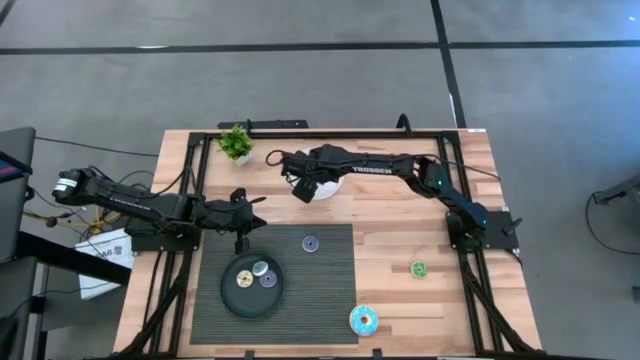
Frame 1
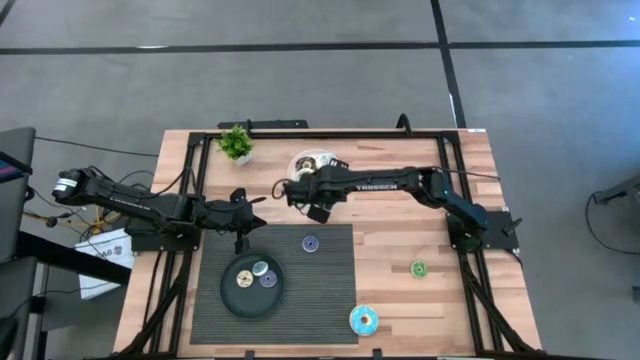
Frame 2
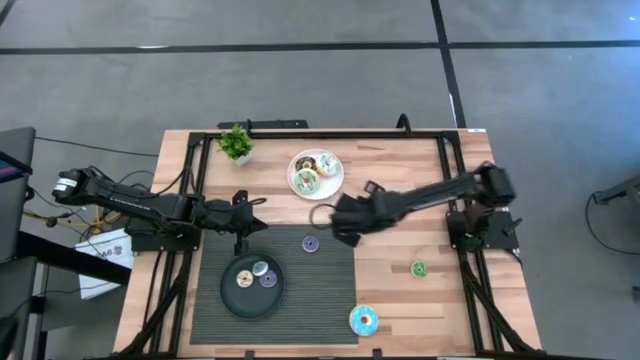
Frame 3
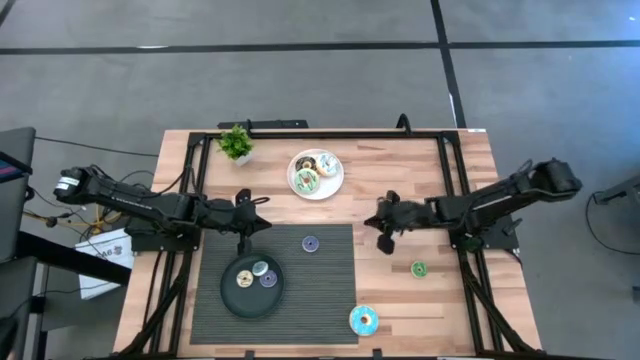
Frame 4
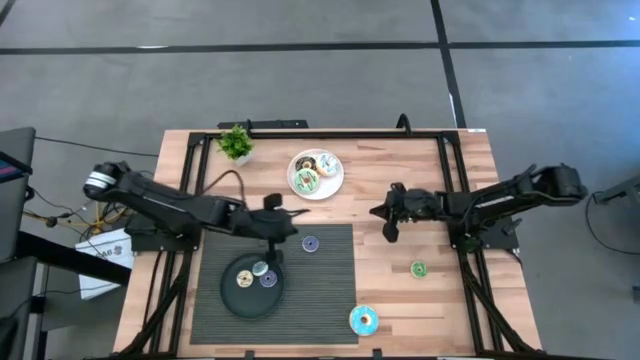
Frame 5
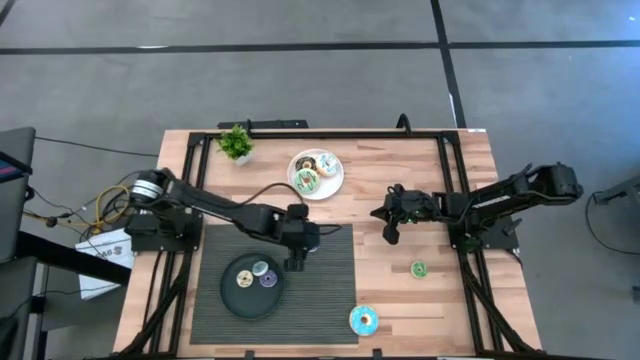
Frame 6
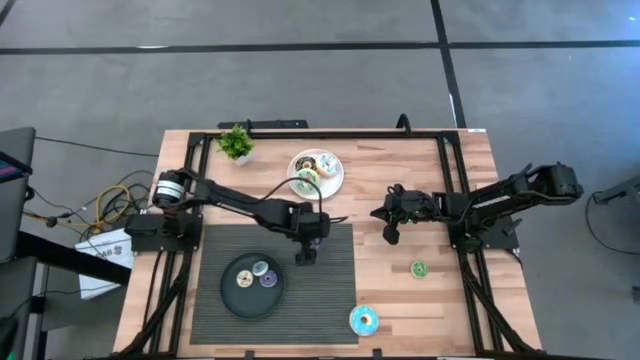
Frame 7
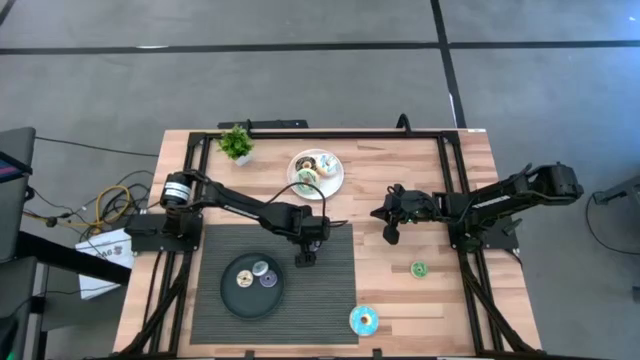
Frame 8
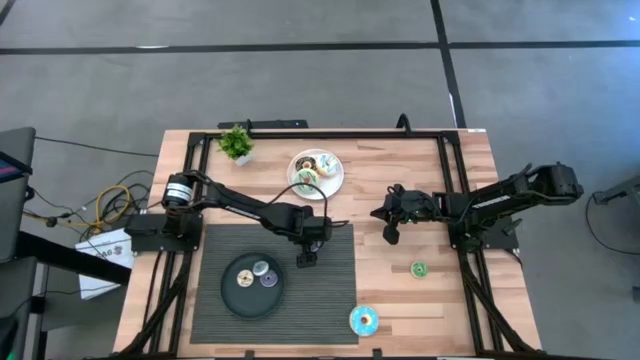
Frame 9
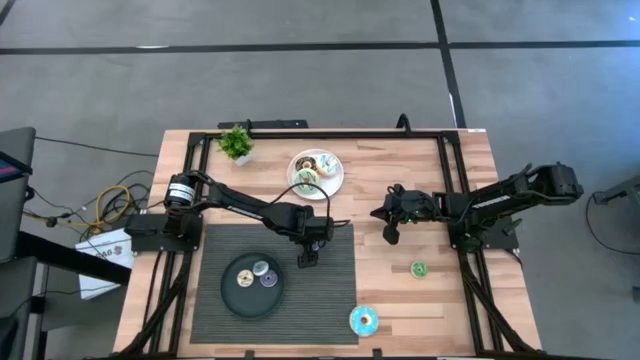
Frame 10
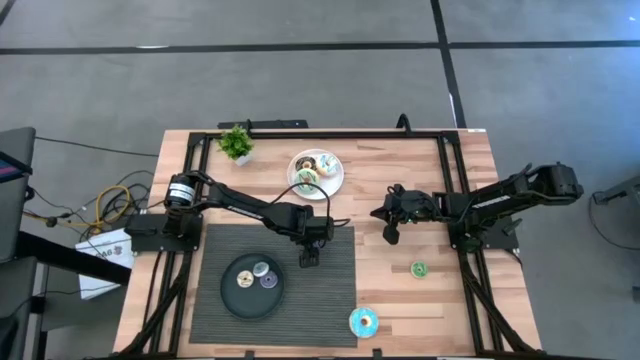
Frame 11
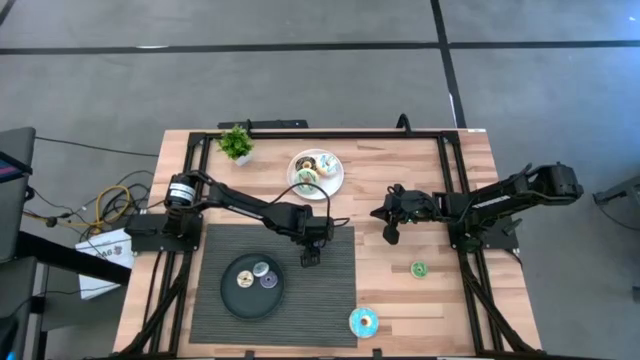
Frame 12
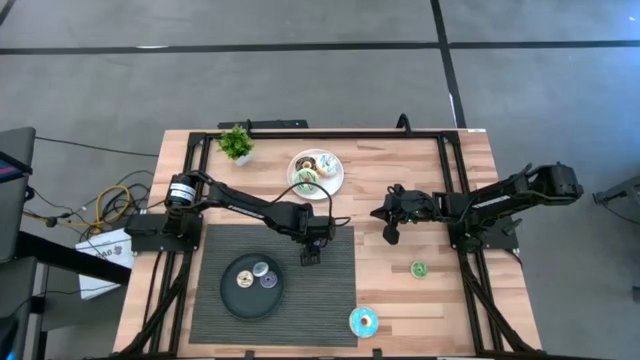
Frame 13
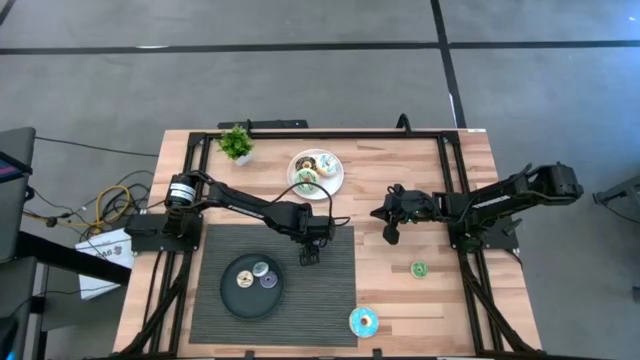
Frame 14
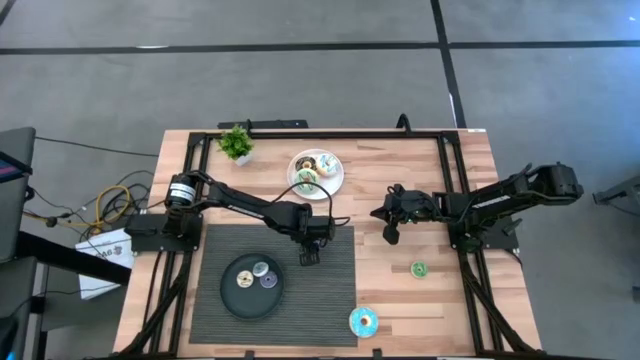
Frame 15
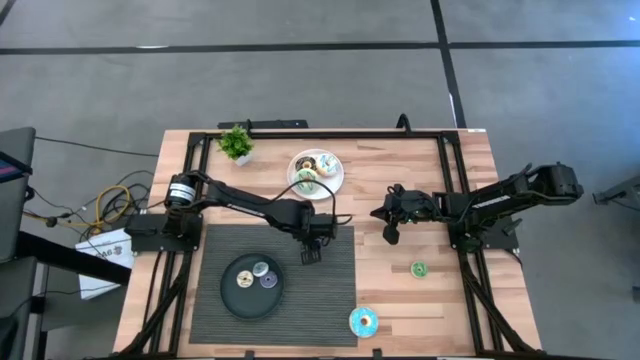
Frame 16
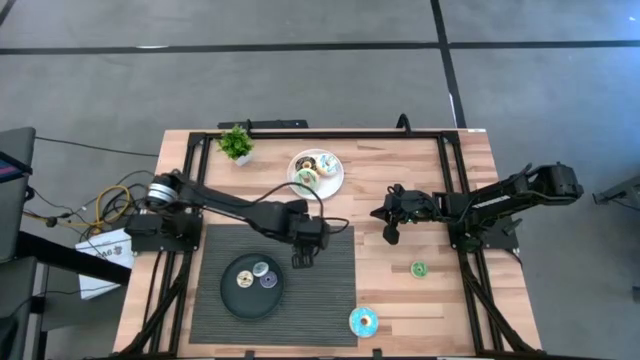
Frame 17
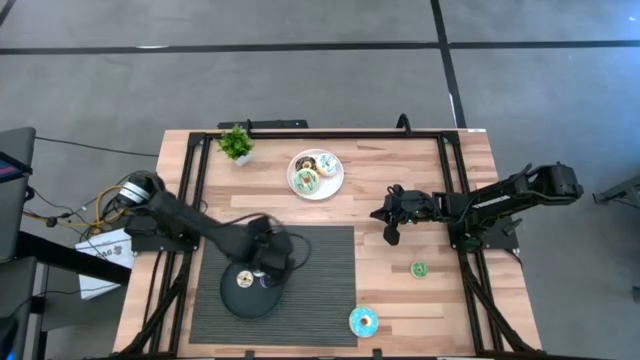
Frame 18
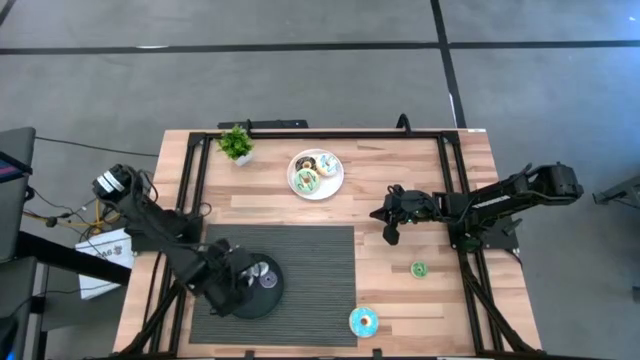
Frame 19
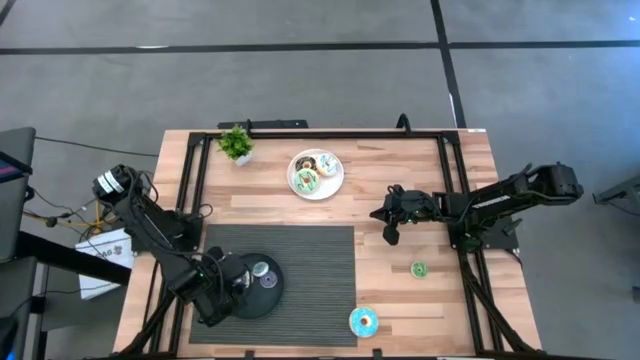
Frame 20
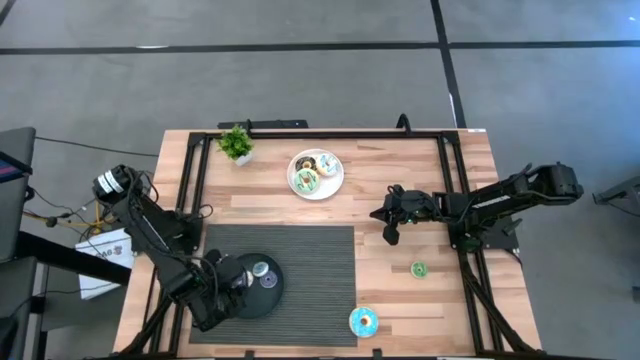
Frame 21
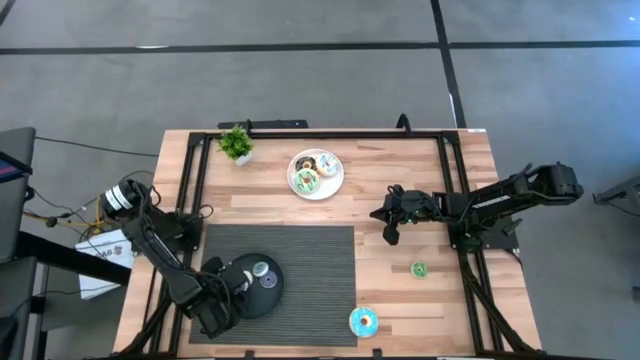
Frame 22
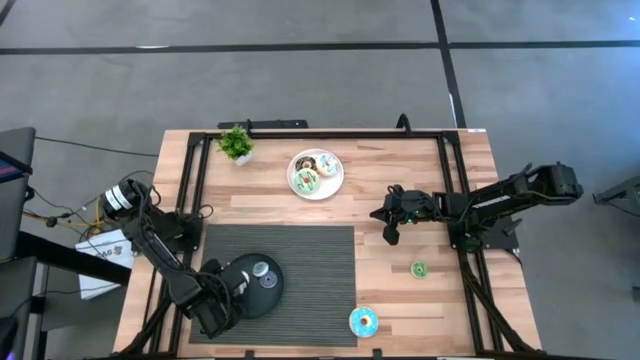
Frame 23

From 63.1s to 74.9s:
Task: Pick & Place donuts
Put the small purple donut on the black plate

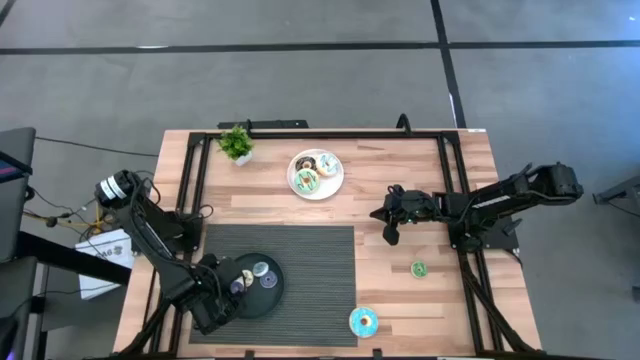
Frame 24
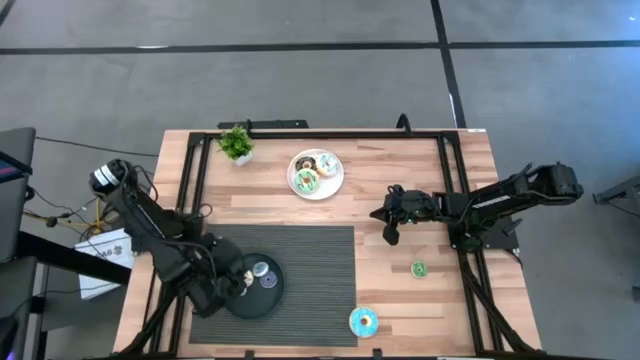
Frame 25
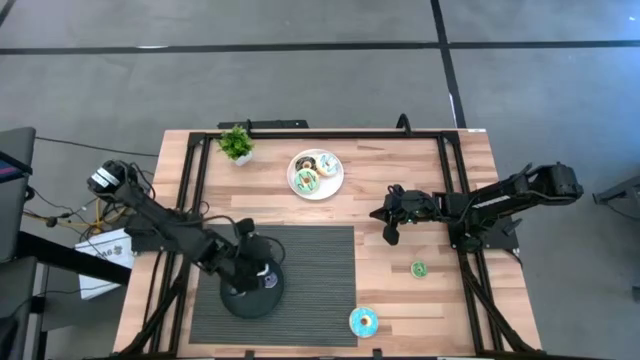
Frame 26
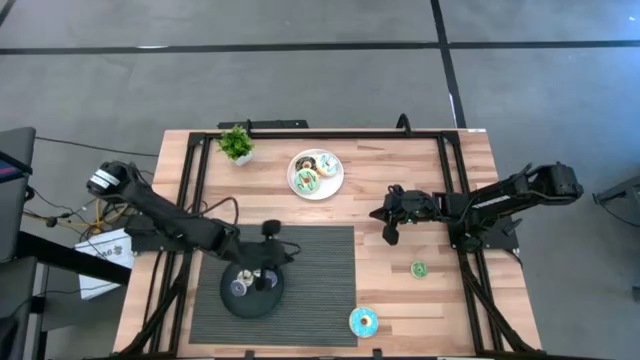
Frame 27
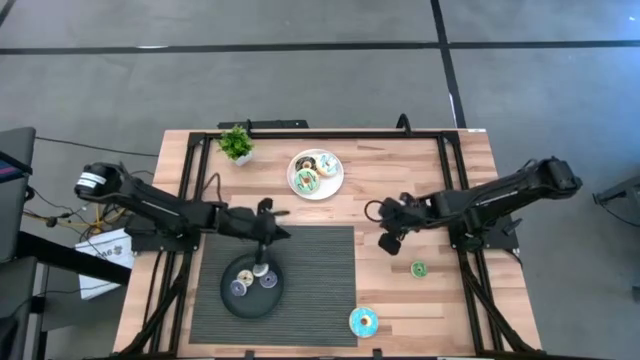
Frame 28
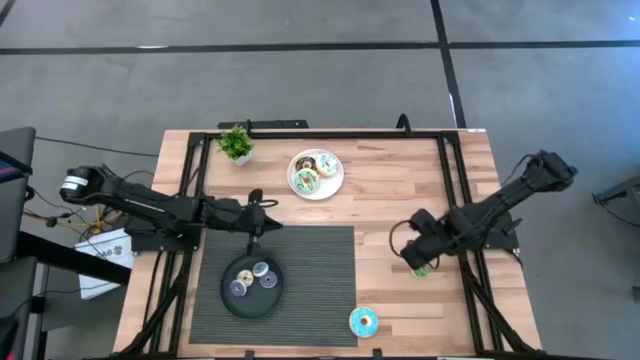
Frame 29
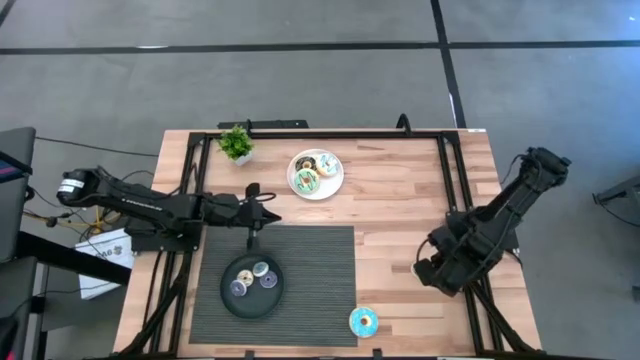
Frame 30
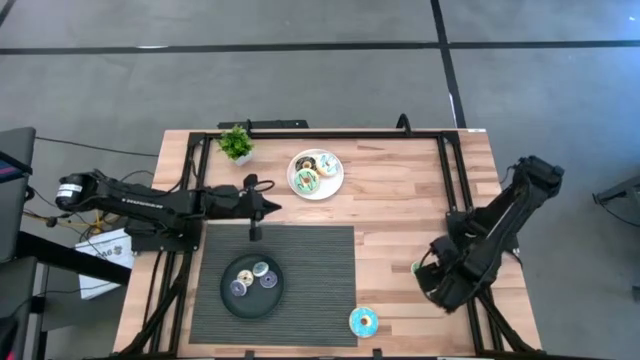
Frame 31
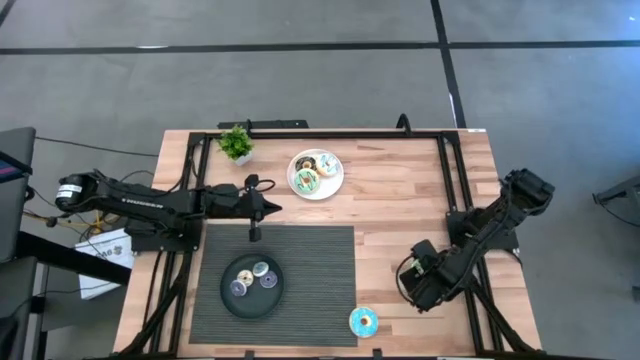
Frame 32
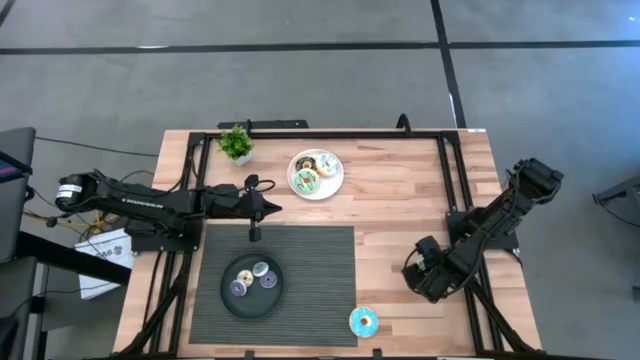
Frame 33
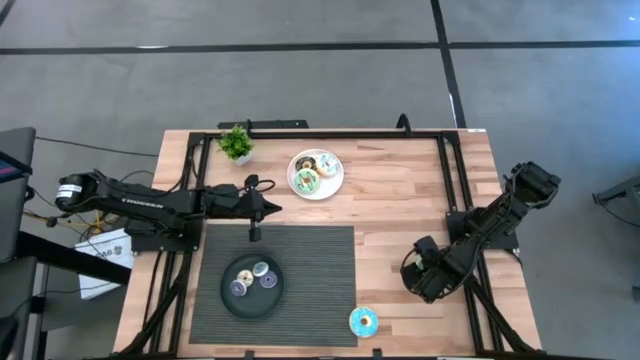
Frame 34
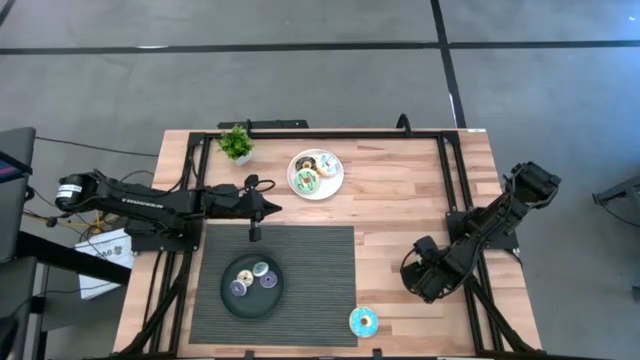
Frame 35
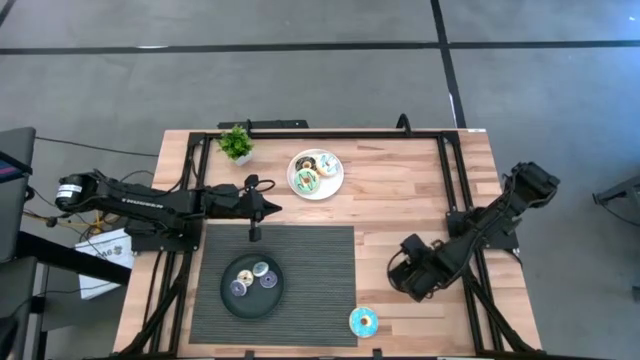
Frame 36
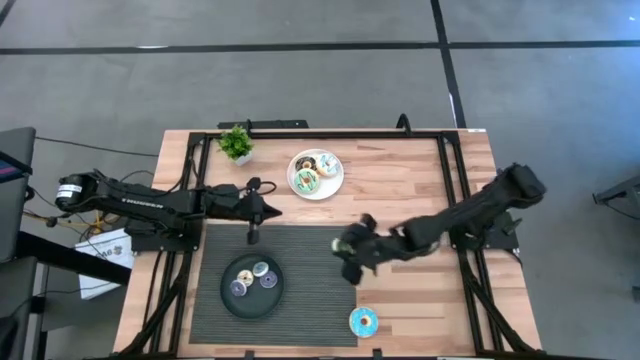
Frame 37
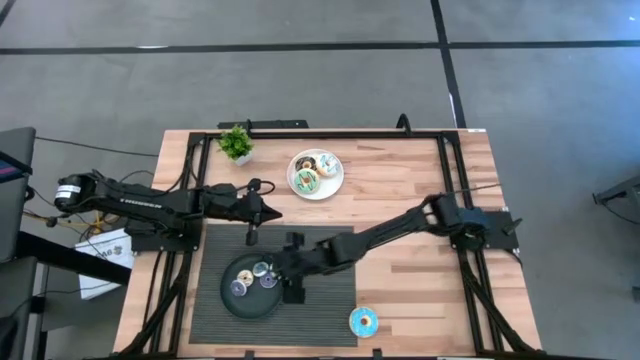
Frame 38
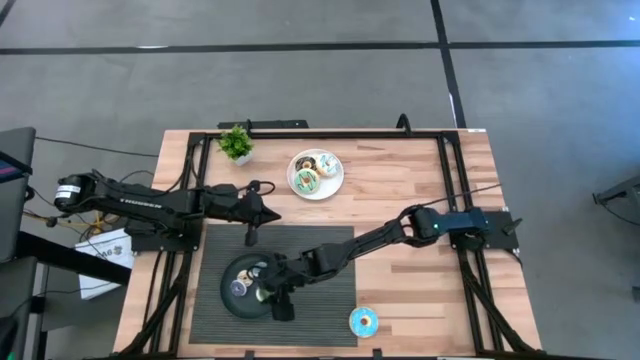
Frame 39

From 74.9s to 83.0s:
Put the small green donut on the black plate

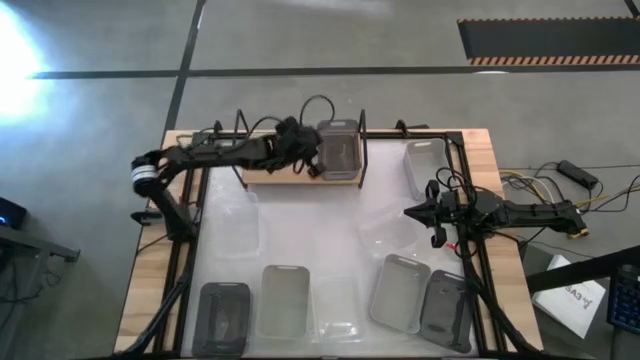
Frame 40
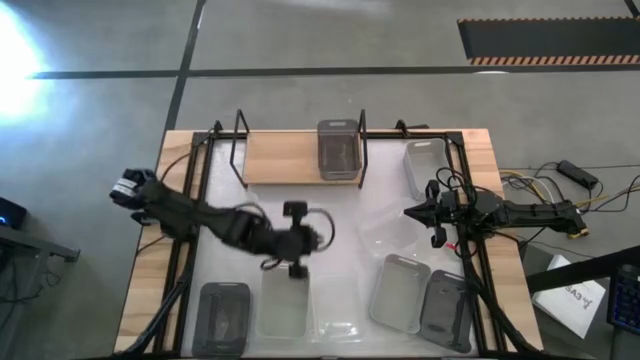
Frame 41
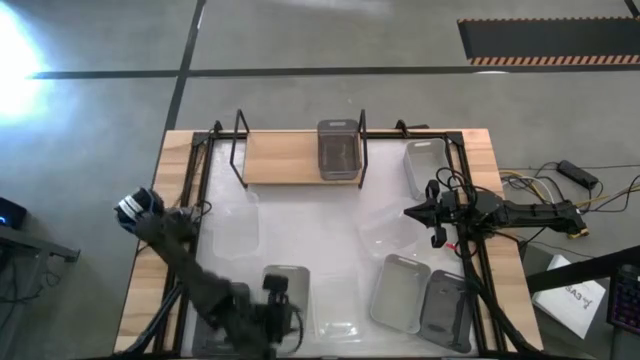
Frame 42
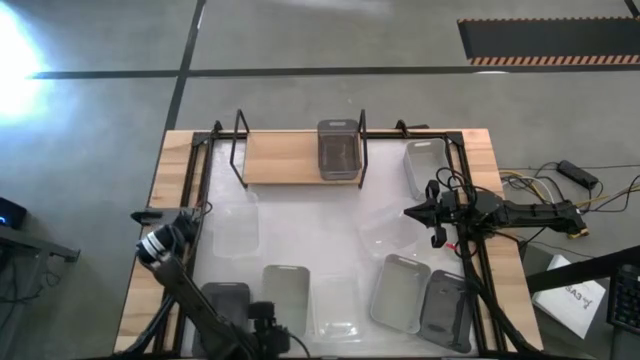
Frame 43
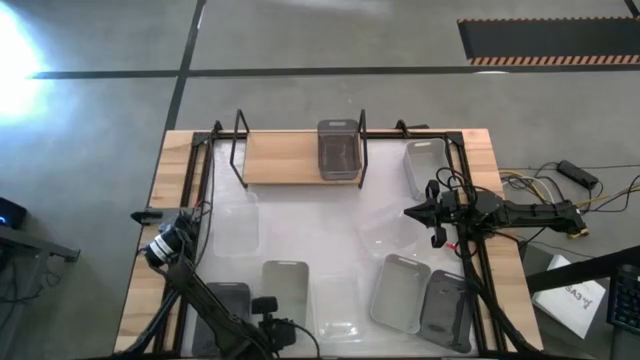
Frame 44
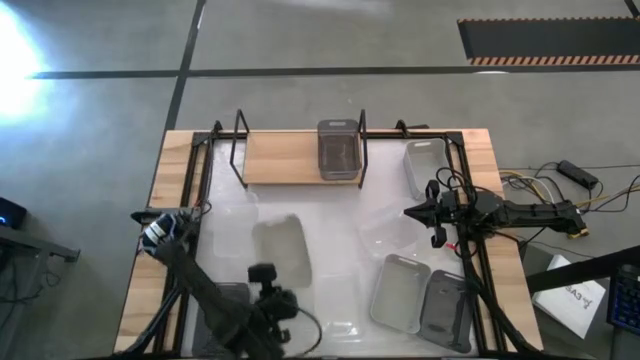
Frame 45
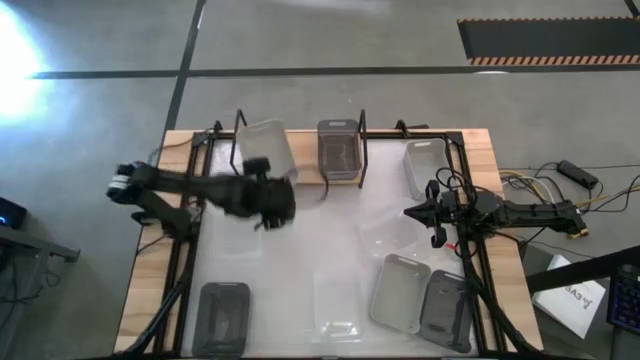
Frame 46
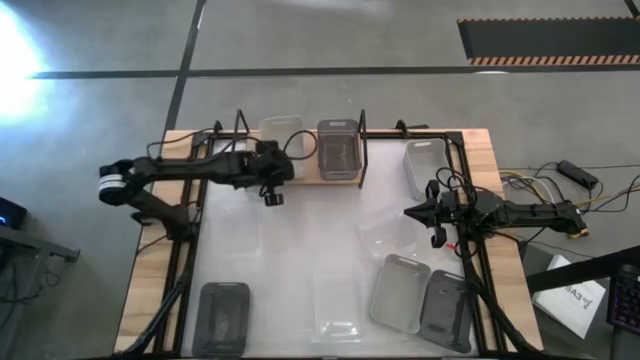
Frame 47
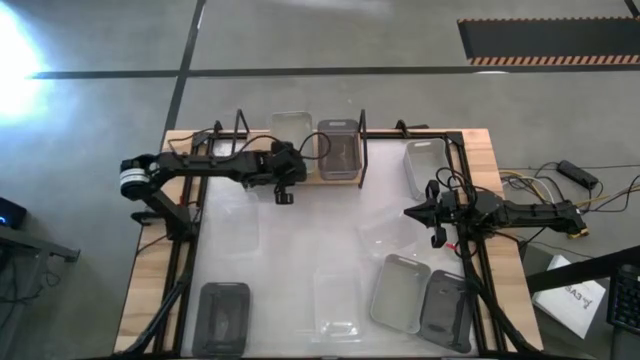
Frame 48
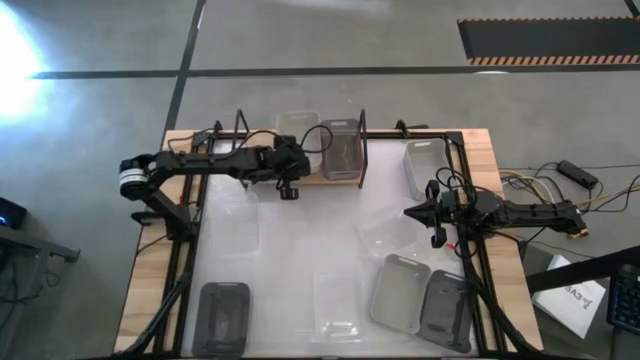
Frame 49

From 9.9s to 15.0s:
Task: Stack baskets on shelf by color
Put the bottom left gray bin on the shelf
